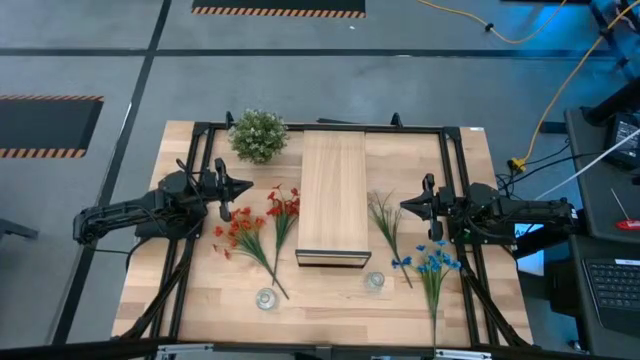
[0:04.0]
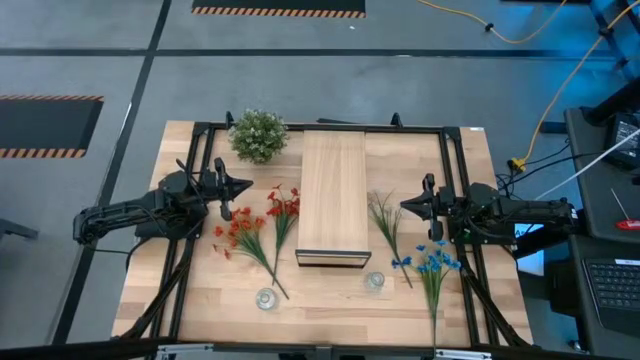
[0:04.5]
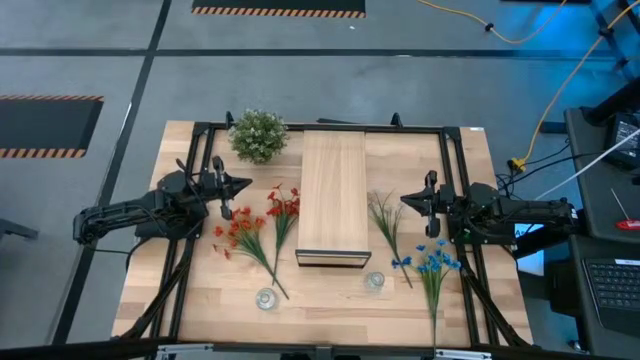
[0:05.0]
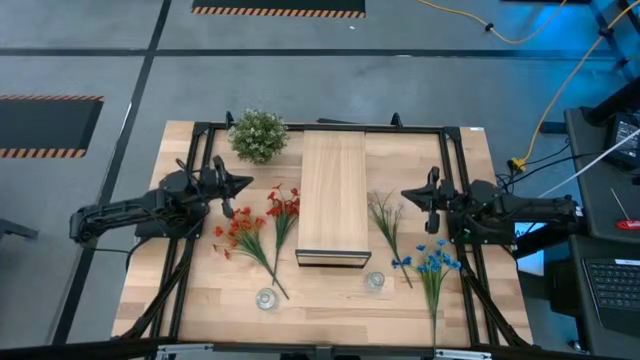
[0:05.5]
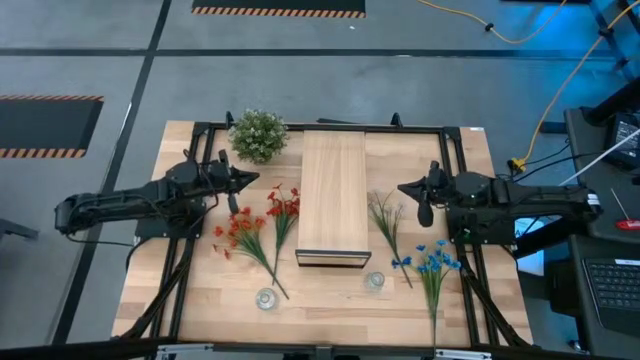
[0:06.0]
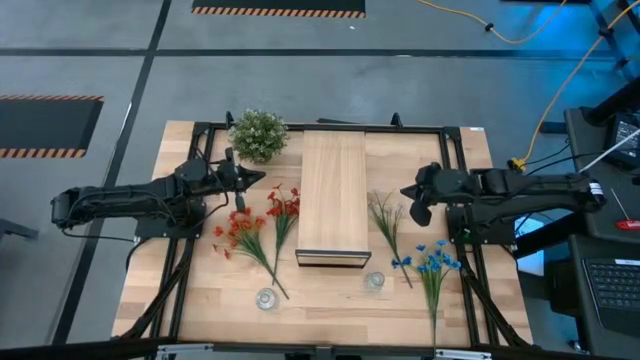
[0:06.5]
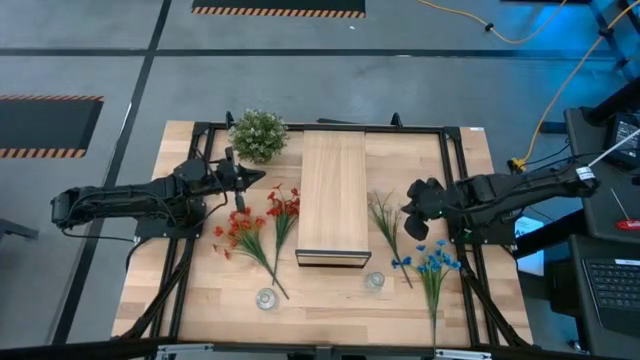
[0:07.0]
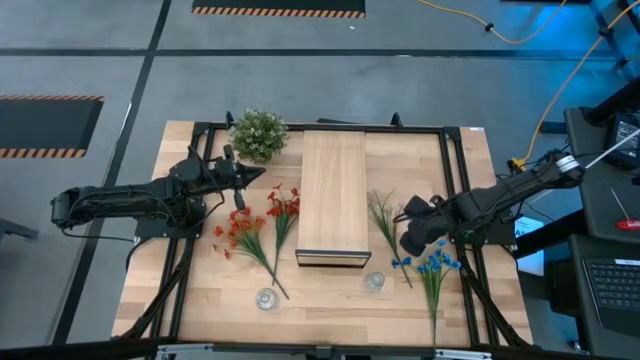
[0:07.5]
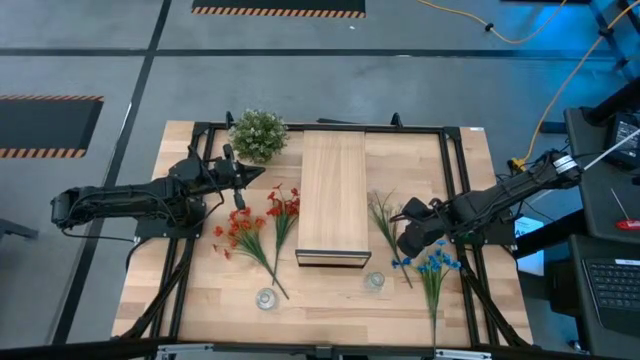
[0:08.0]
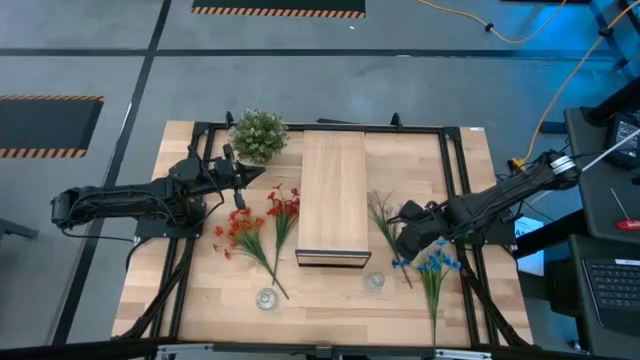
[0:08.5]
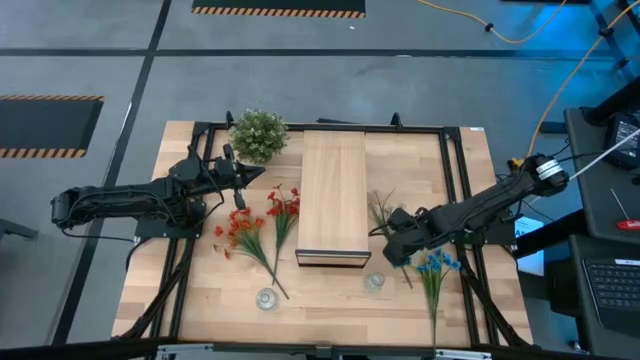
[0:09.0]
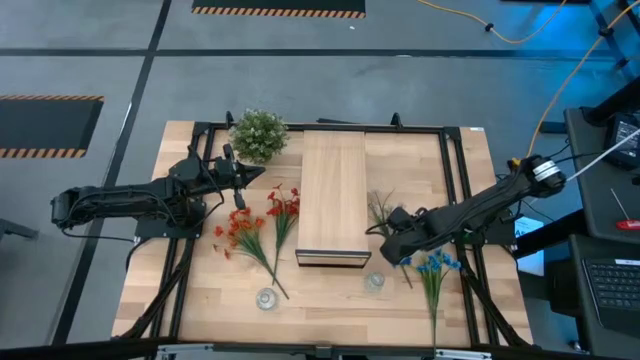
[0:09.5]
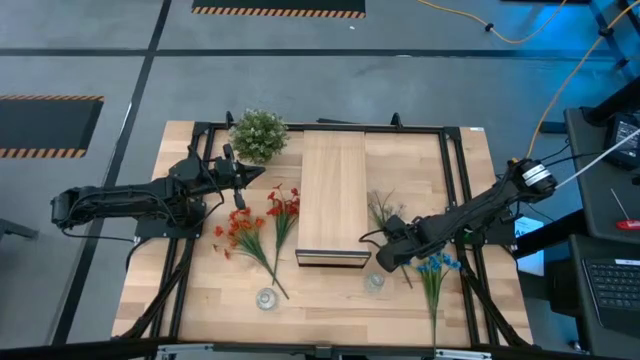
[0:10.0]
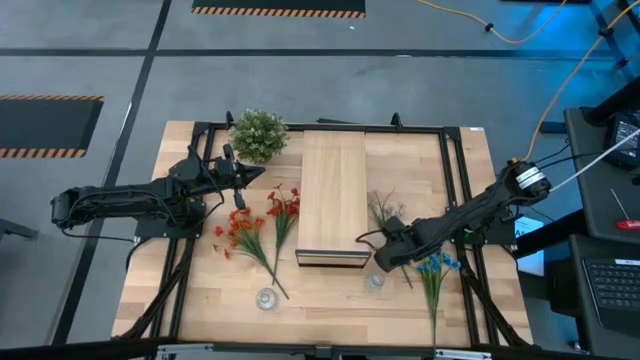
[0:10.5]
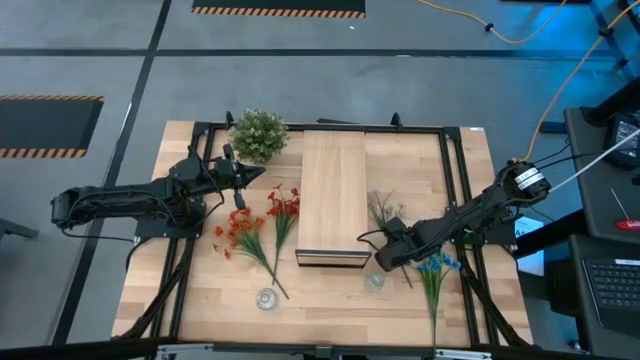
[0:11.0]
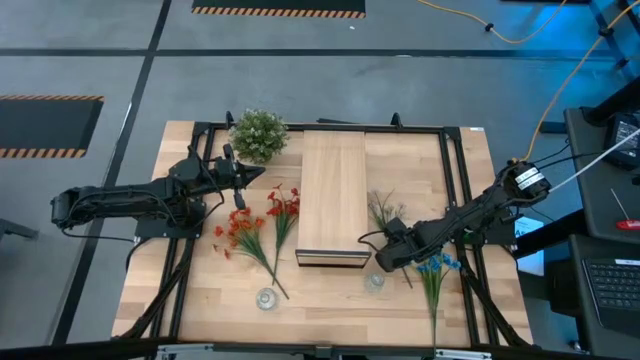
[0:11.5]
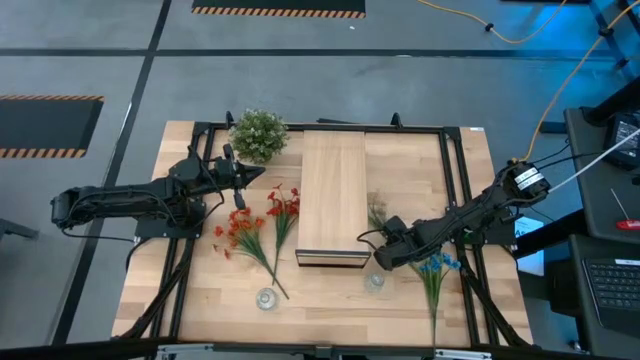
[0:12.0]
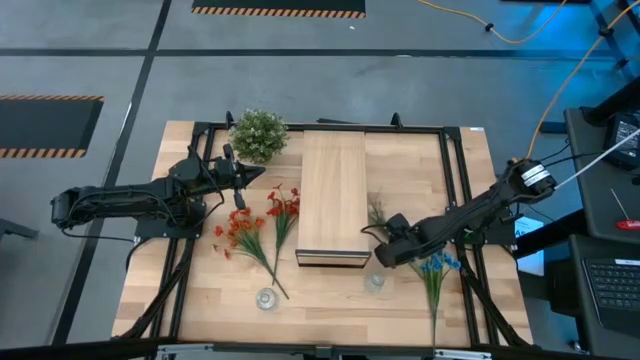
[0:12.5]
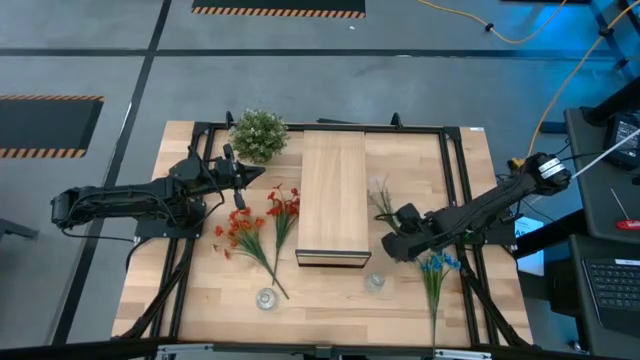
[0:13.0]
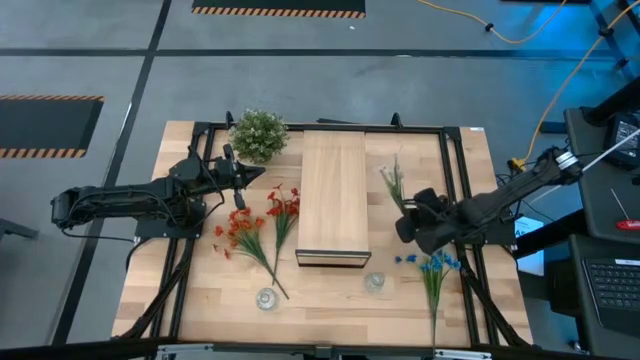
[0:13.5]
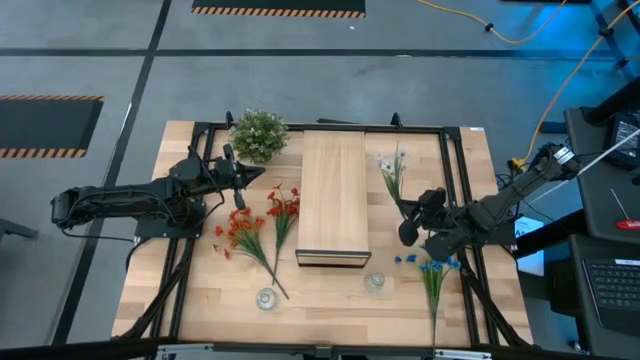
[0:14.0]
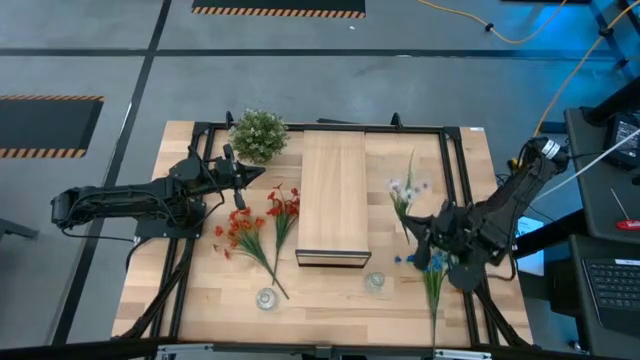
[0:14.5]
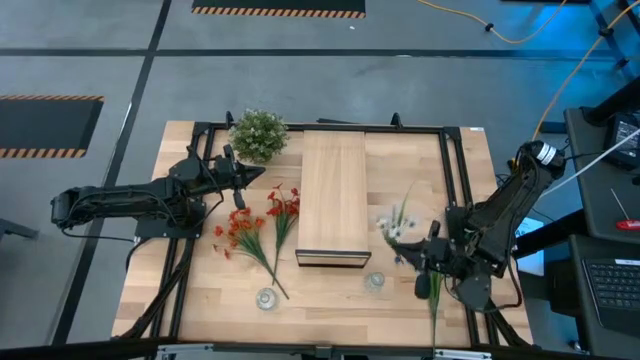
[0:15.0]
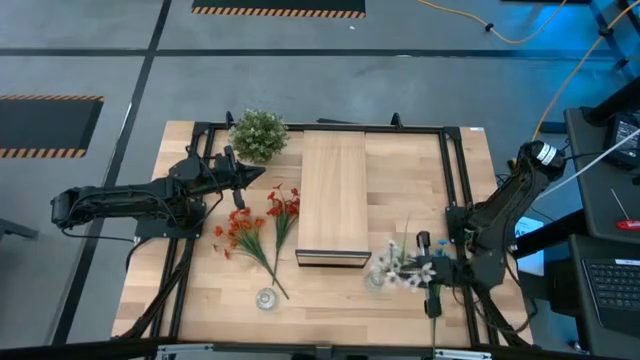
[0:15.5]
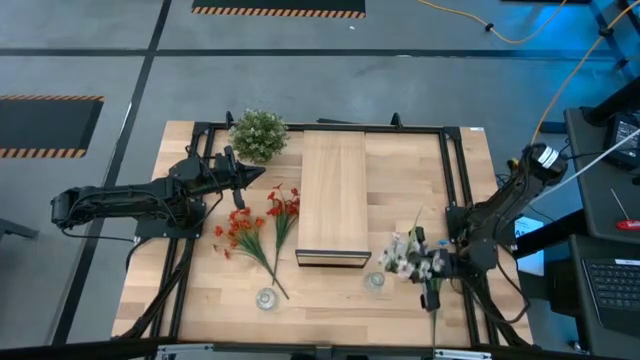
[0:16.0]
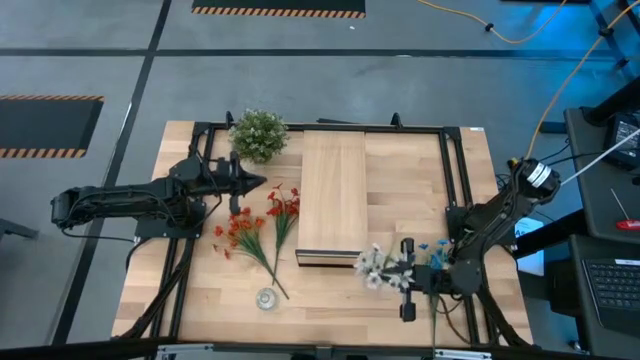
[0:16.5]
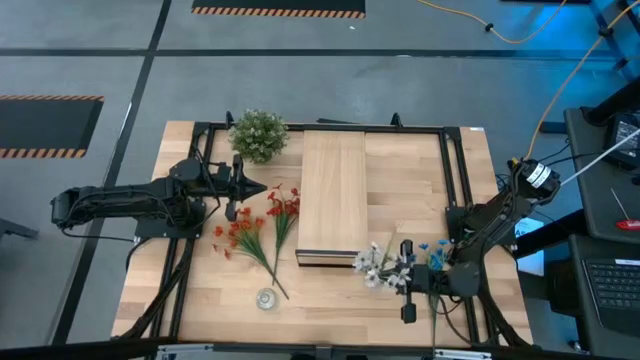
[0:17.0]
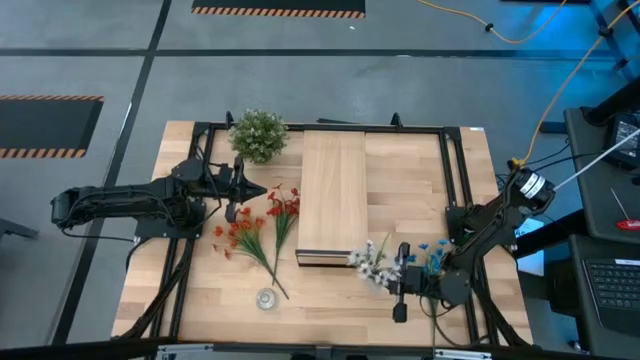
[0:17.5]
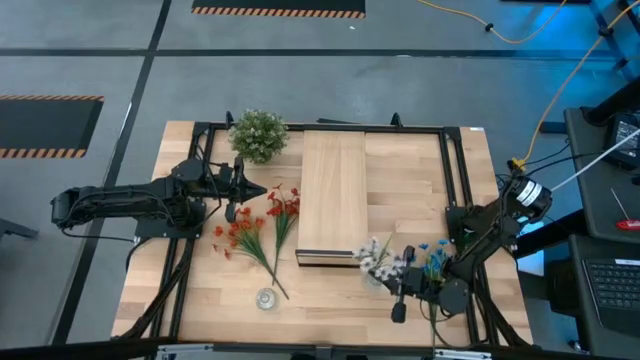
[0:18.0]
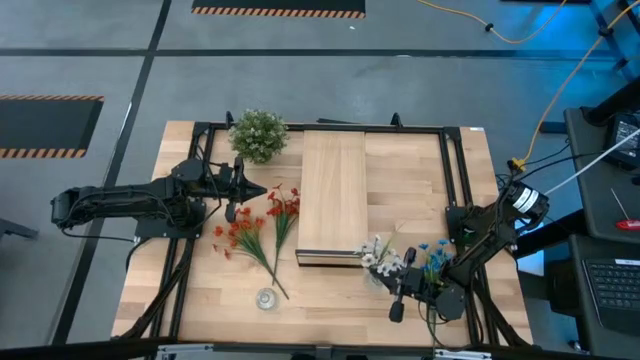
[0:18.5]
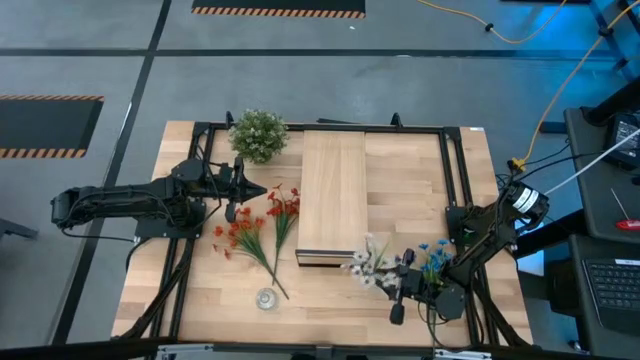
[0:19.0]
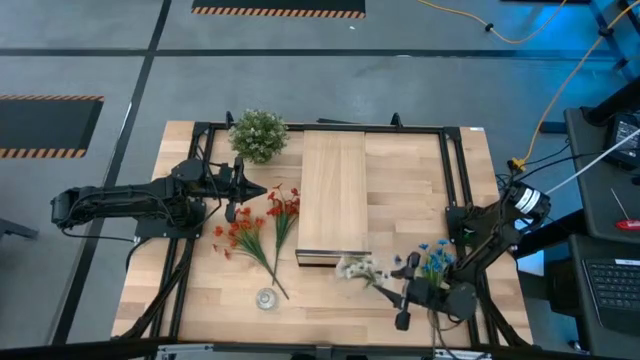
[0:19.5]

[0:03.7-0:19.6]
Task: Pick and place flowers into a vace then onto a shelf
Put the white flowers into the right transparent flower vase

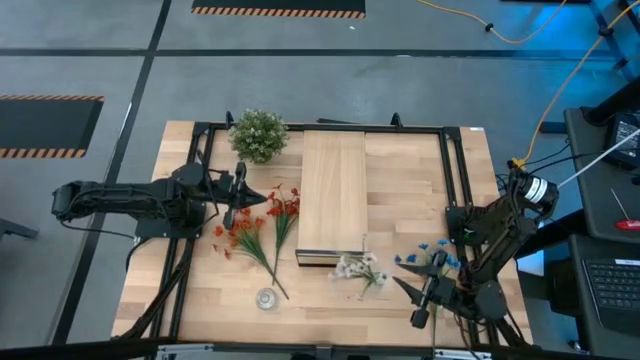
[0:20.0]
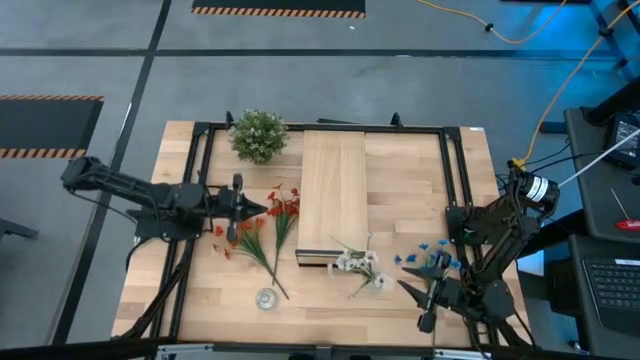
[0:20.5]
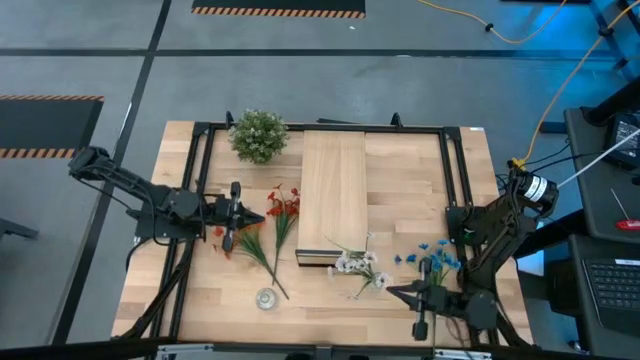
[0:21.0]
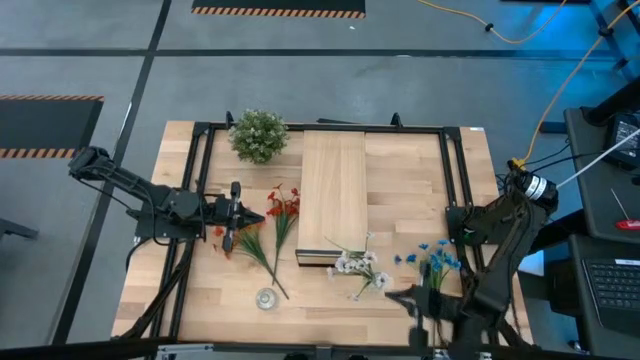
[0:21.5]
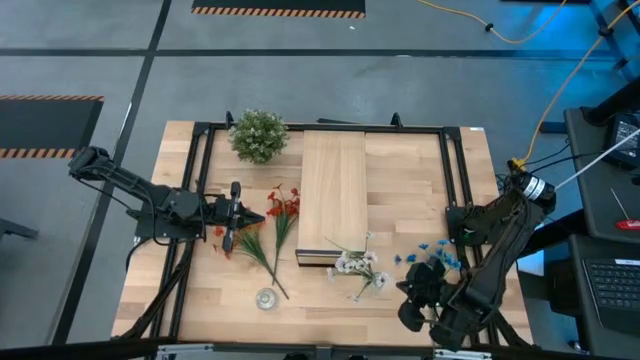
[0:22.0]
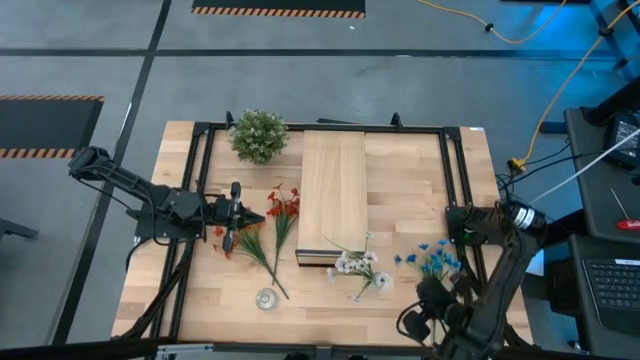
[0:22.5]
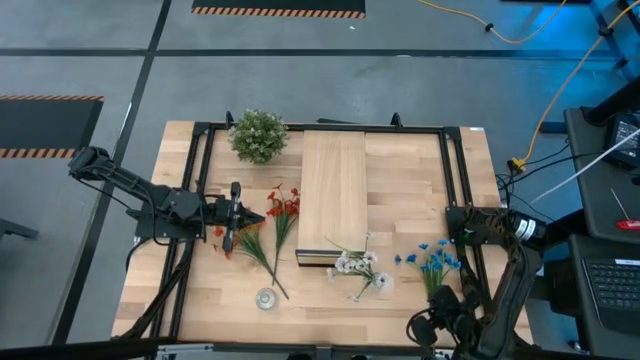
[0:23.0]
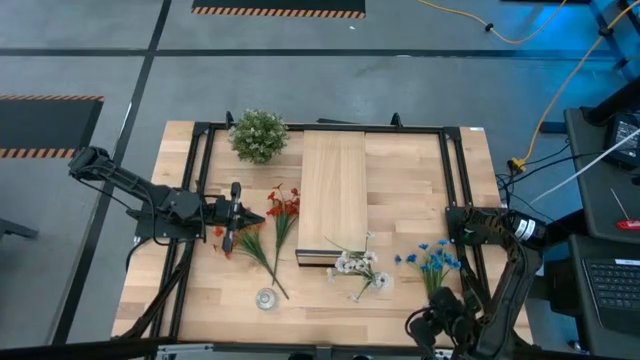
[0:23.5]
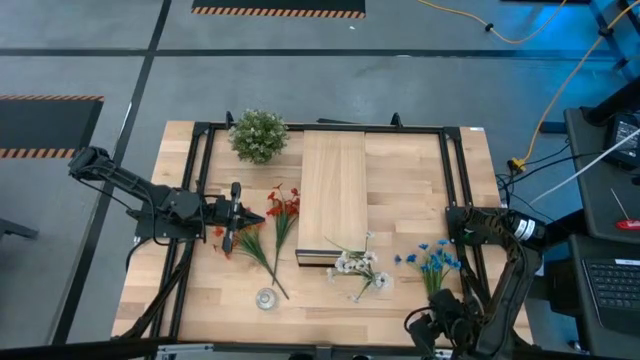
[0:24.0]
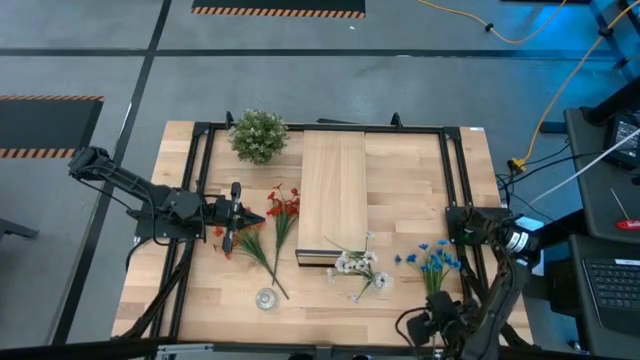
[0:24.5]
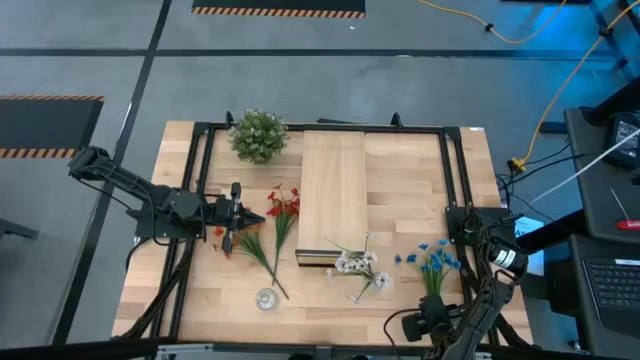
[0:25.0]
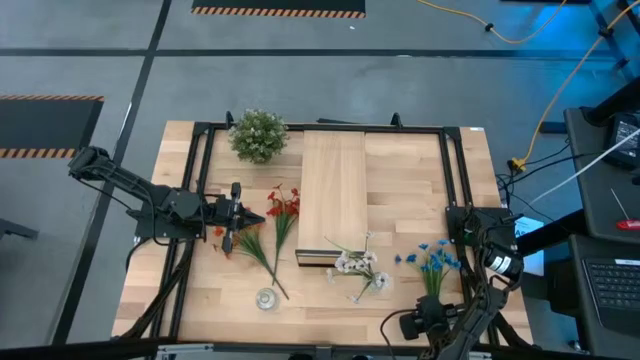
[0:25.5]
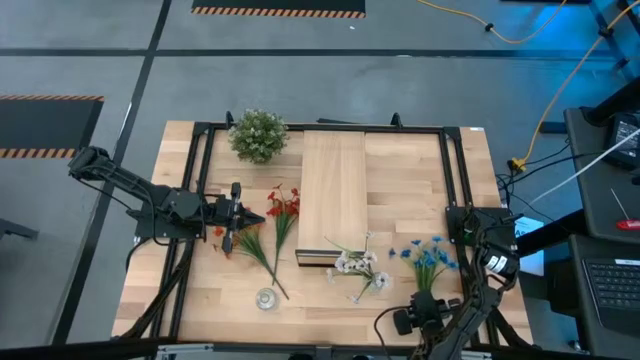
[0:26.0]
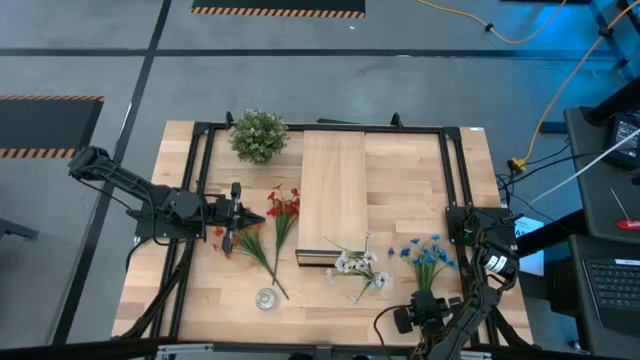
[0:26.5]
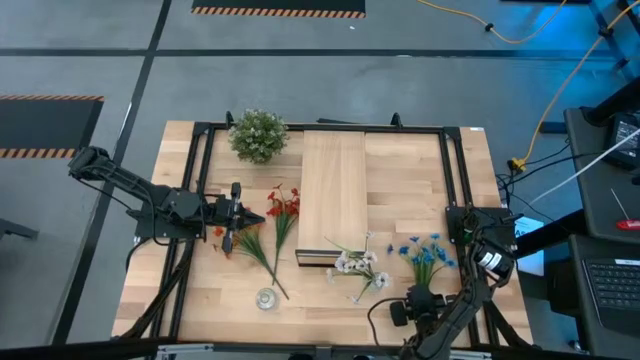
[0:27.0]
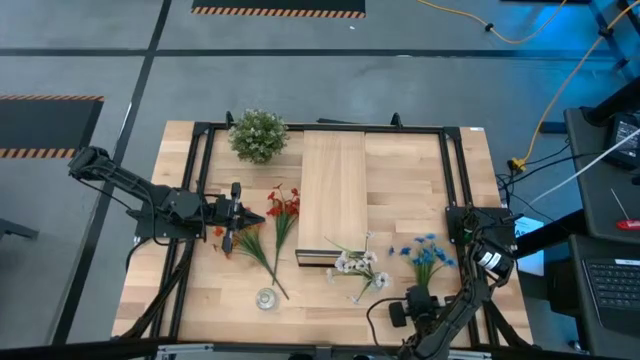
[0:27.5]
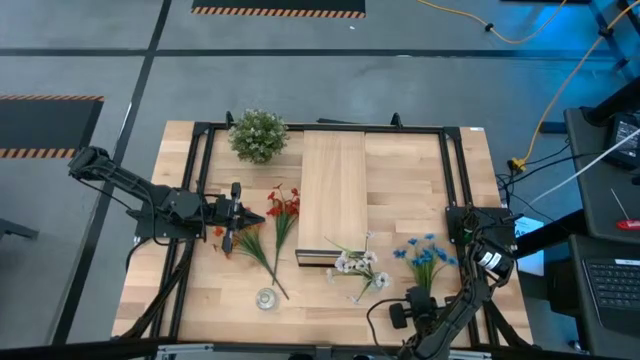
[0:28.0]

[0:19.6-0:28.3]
Put the blue flowers into the right transparent flower vase
